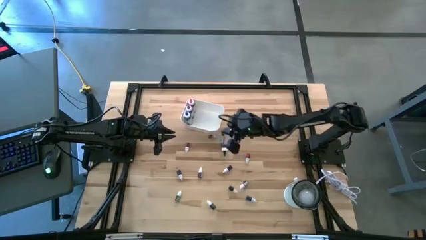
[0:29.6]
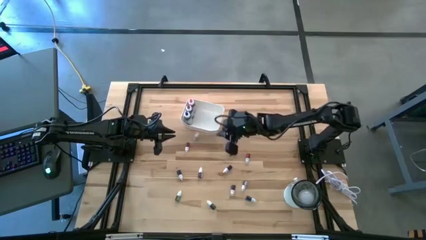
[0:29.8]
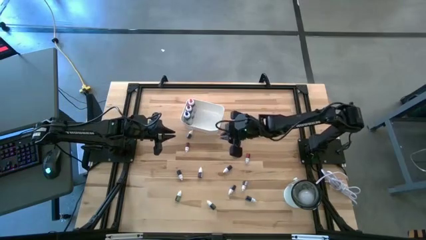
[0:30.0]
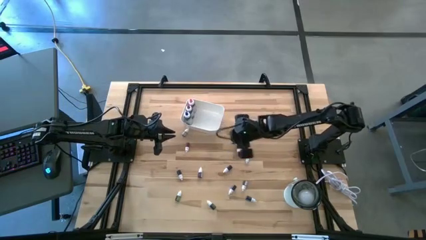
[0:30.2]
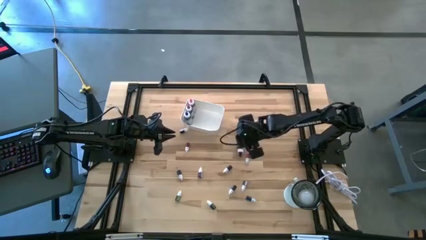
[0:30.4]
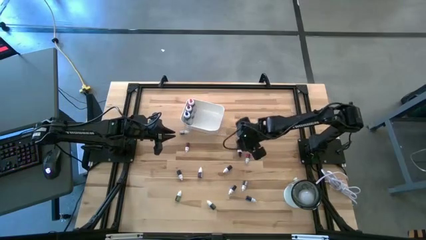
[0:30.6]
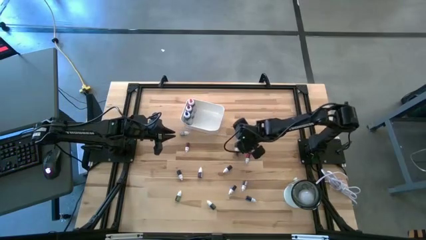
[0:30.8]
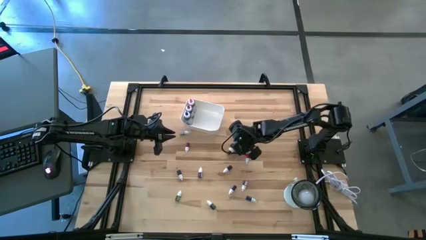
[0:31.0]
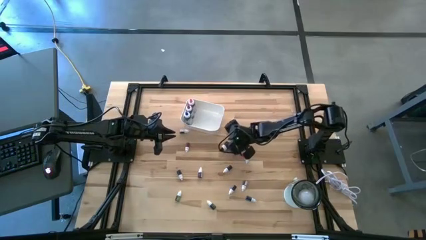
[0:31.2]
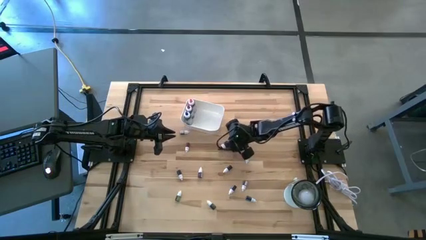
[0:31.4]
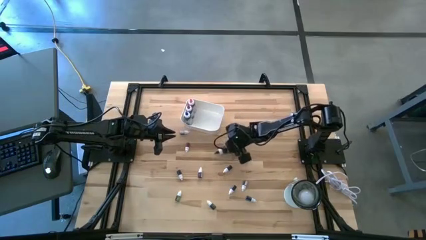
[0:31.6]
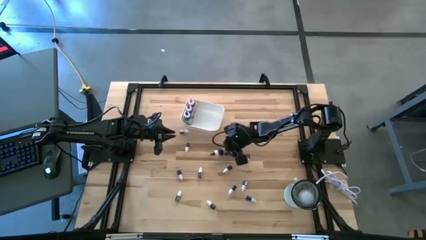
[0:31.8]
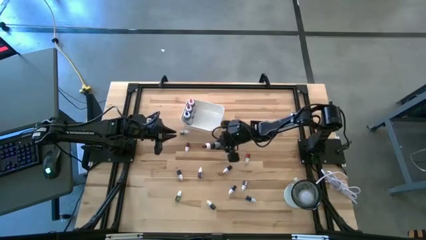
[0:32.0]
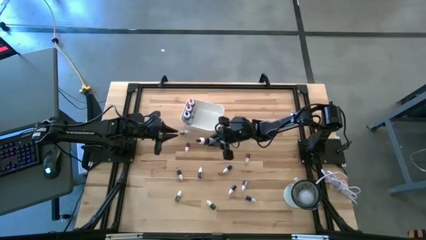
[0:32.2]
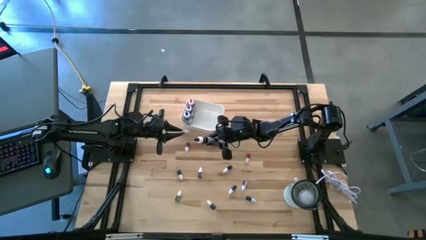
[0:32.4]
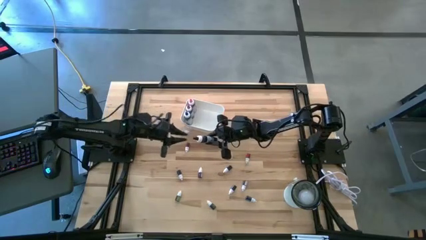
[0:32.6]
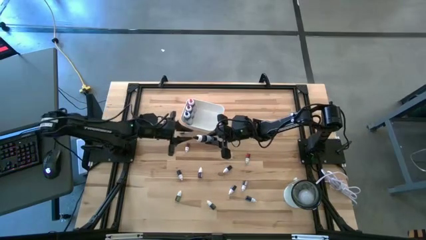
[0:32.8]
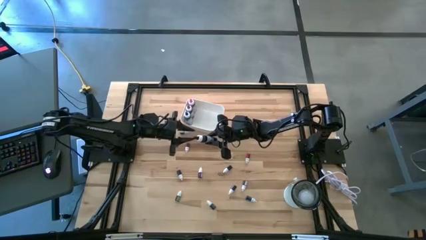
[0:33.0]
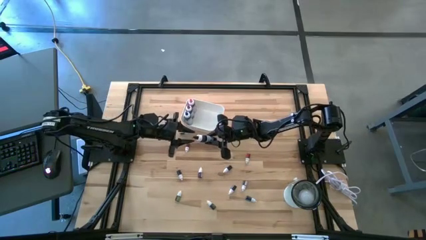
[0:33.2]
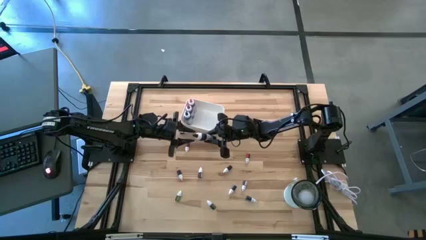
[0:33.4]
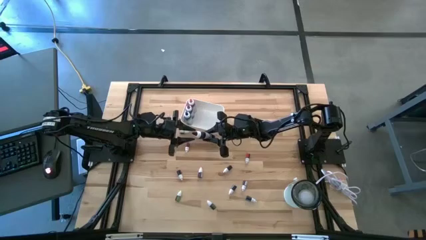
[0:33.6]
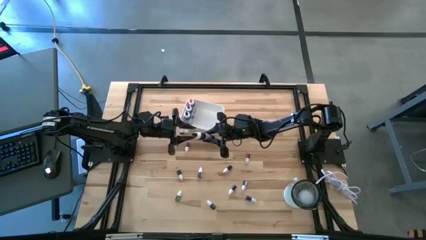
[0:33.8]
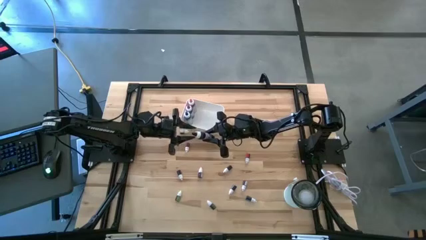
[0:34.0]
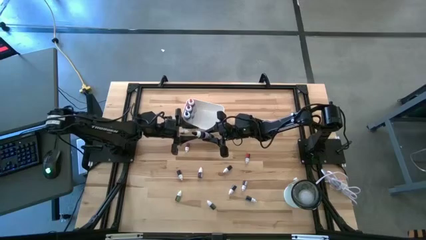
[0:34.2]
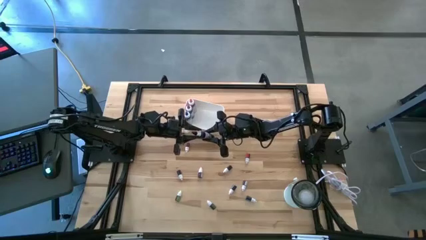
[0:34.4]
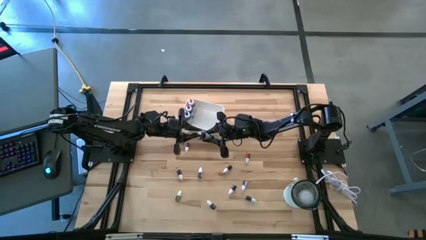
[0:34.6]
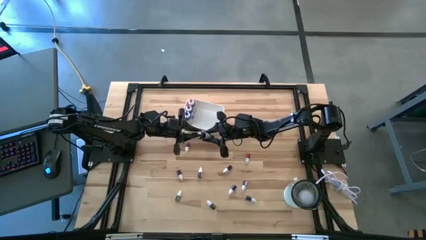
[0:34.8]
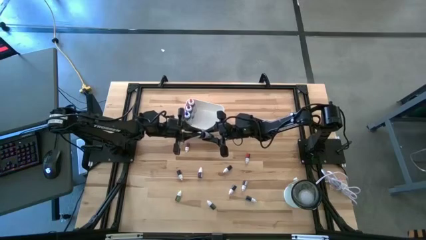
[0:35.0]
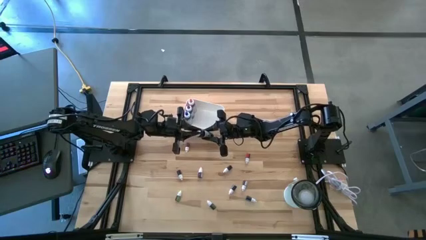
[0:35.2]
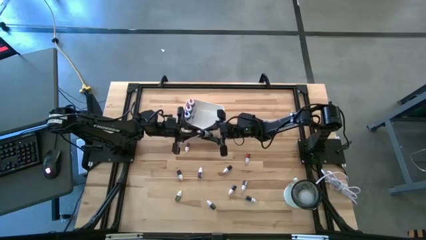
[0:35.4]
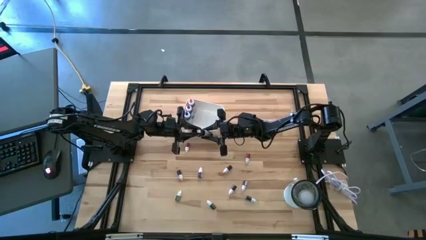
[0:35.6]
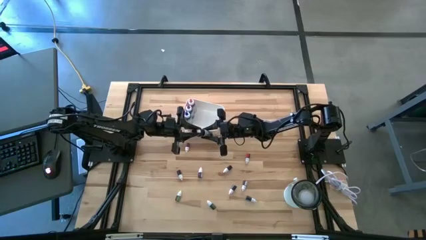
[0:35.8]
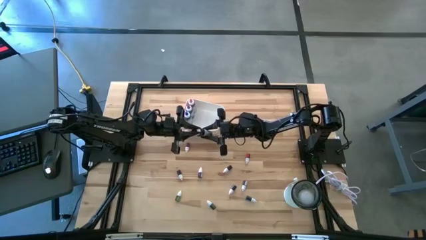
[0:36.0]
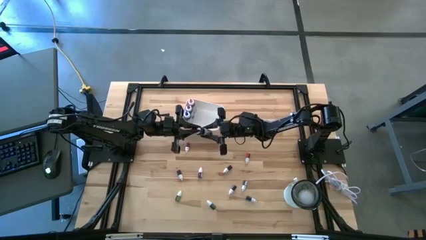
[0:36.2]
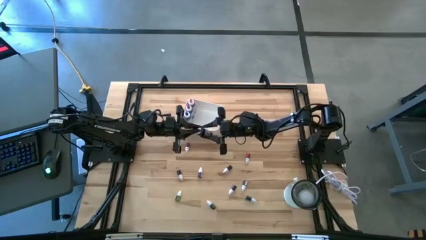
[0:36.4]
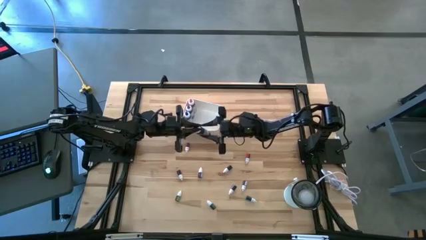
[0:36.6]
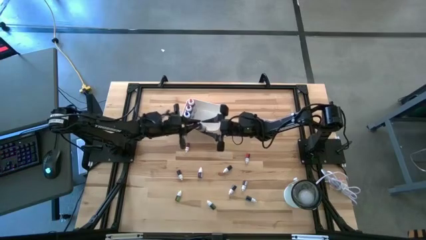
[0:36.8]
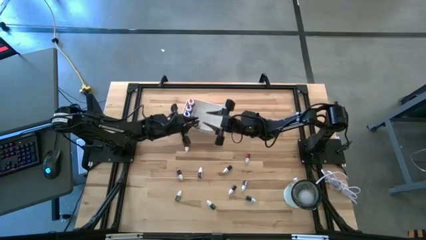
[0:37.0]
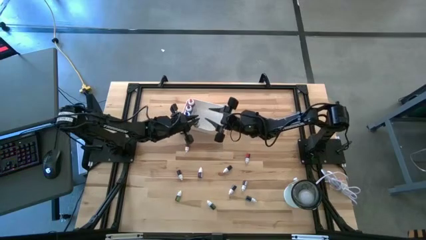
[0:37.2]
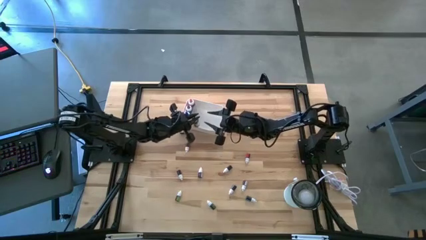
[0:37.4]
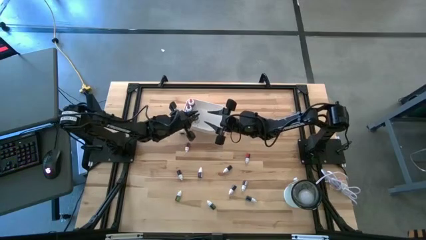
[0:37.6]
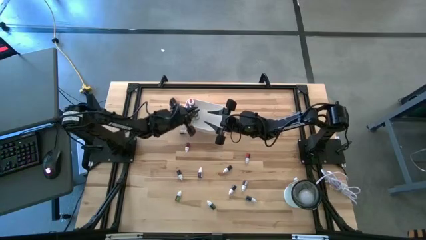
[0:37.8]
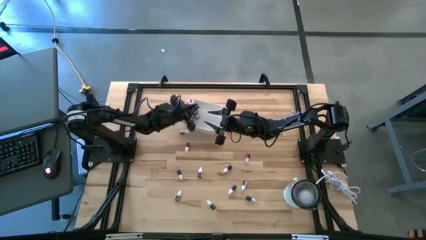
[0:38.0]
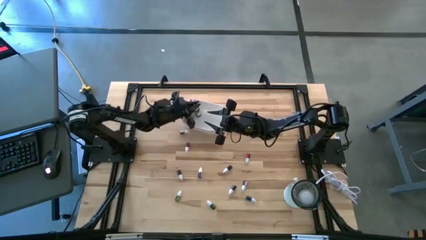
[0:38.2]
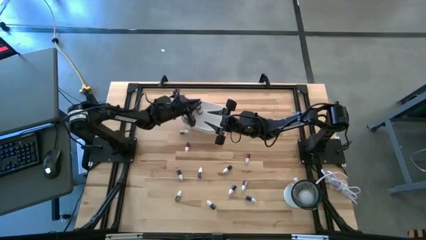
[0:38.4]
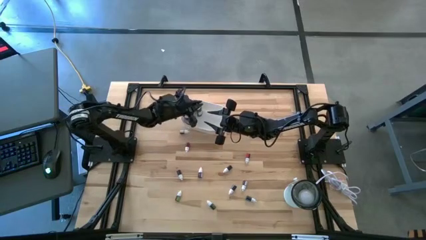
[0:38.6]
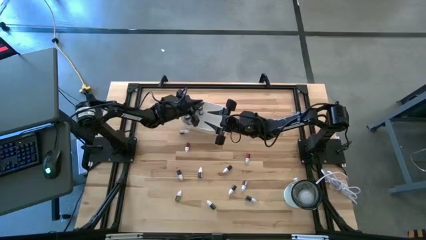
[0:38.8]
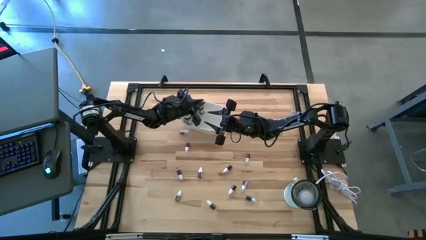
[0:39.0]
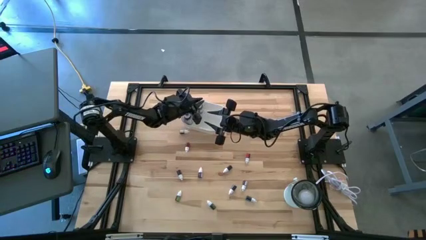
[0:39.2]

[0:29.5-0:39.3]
Task: Pick & Place food coloring
Put the large black food coloring bottle into the white bin

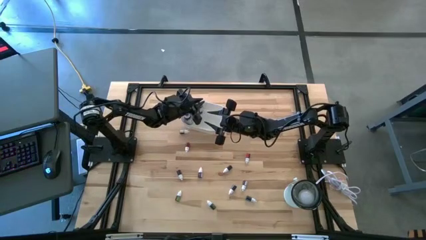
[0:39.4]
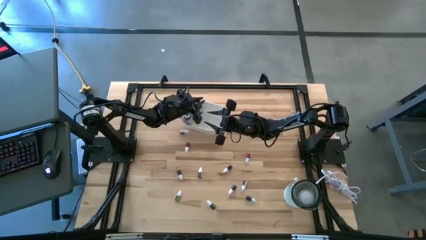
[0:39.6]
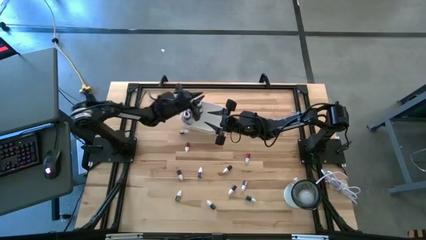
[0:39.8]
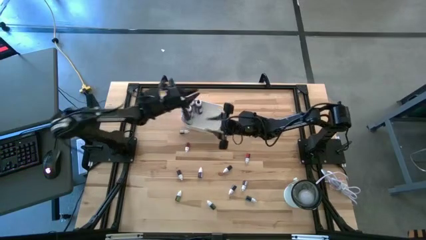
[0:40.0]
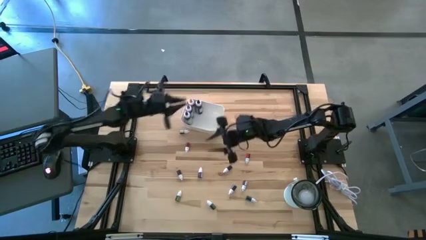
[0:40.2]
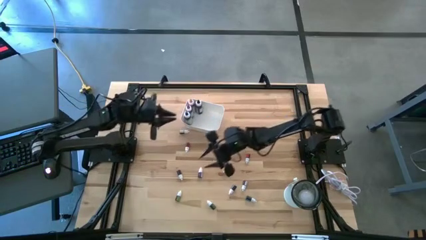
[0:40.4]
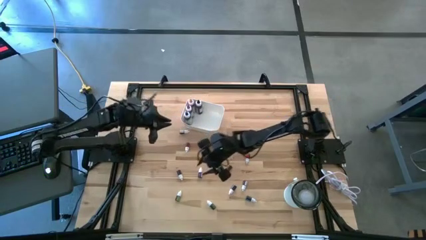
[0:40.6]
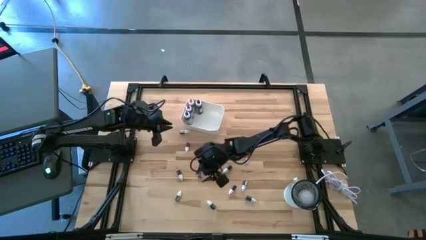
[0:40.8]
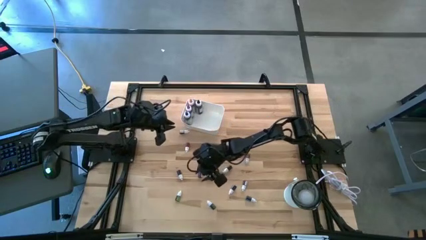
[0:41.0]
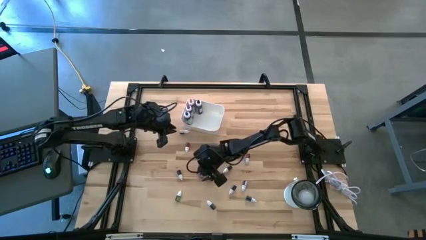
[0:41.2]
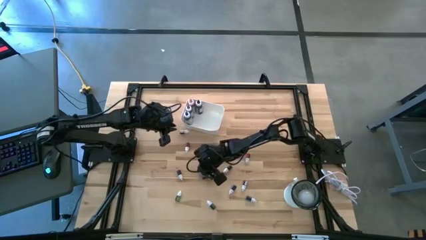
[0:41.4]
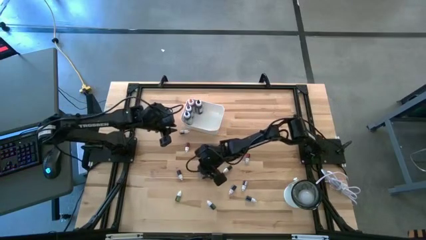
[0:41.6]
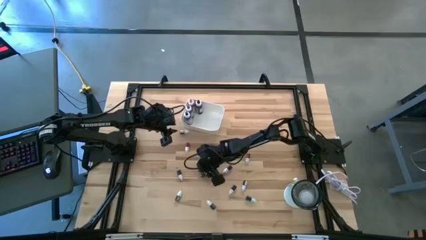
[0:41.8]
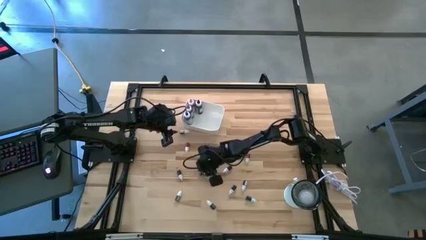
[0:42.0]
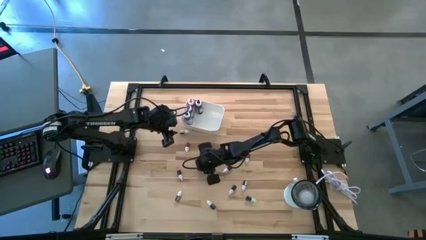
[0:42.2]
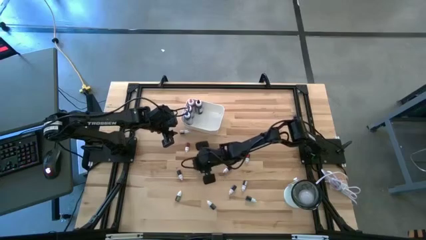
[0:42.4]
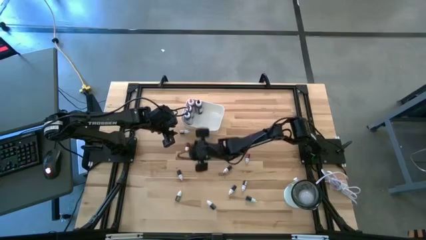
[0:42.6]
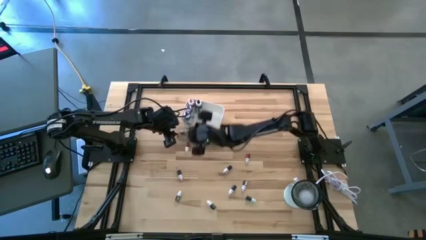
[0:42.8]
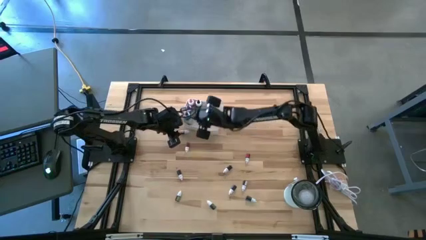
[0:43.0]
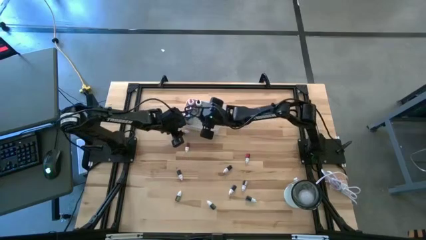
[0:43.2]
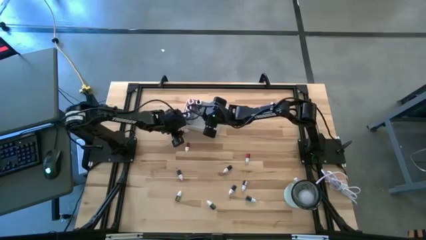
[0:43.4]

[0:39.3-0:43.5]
Put the small left purple food coloring bottle into the white bin

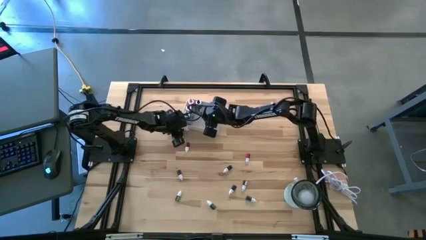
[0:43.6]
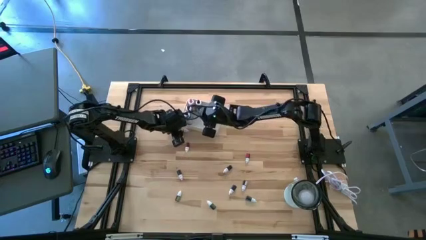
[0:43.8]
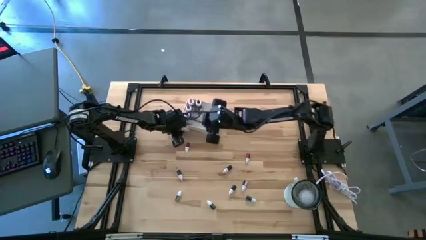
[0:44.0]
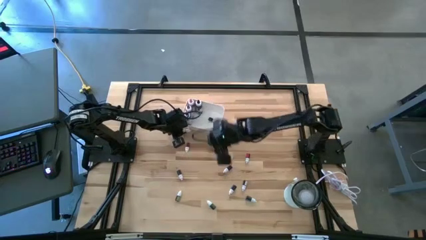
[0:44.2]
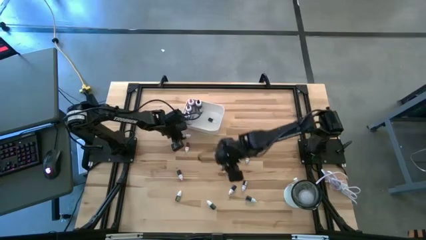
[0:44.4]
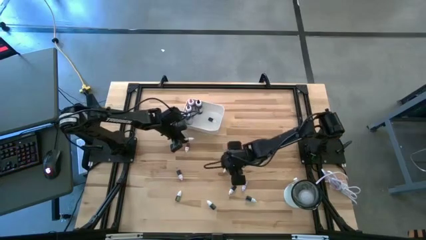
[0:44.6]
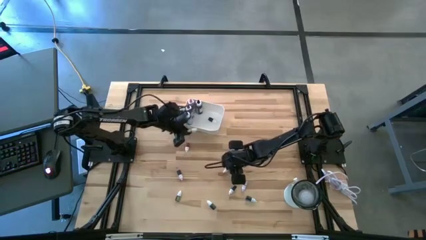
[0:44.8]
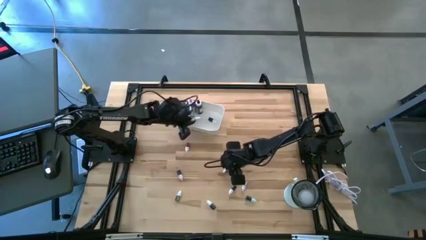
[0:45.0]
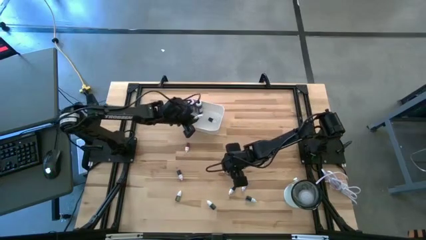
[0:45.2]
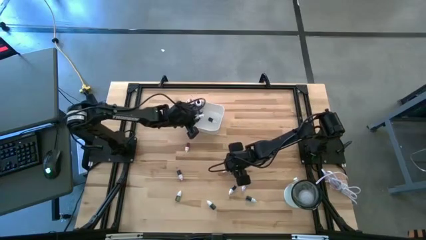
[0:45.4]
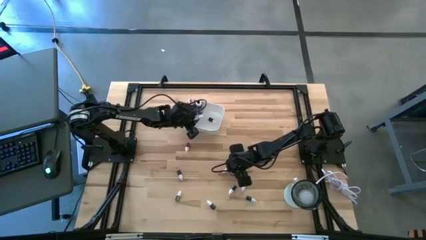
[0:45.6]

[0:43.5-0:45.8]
Put the small top green food coloring bottle into the white bin

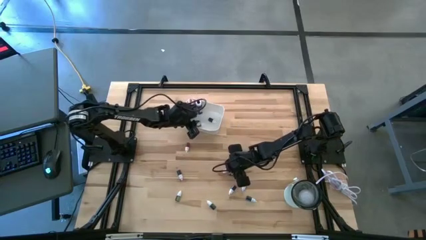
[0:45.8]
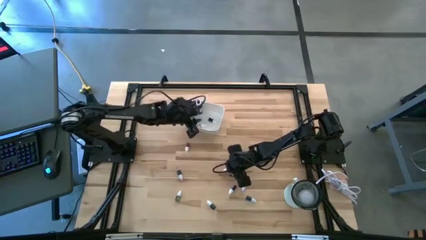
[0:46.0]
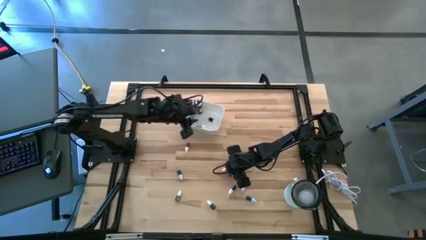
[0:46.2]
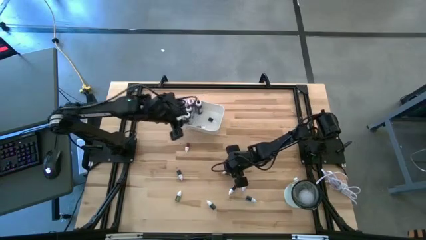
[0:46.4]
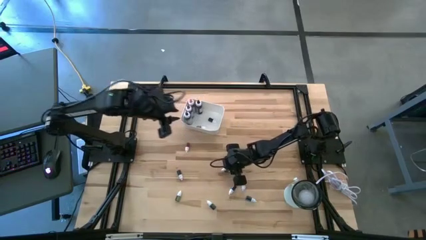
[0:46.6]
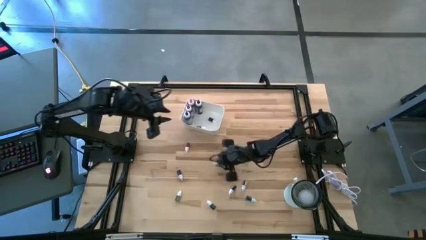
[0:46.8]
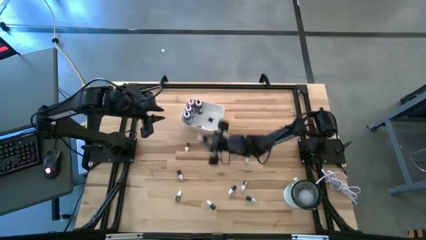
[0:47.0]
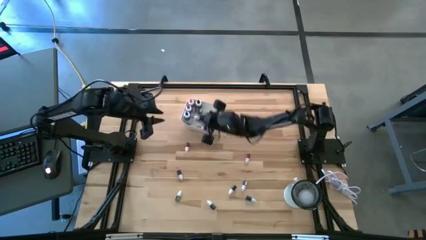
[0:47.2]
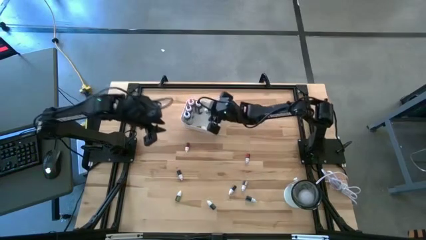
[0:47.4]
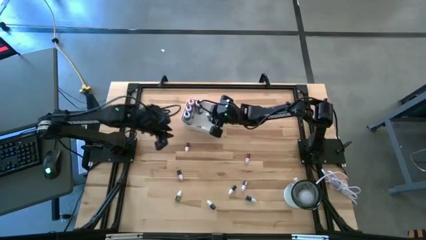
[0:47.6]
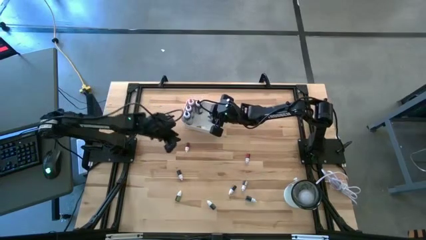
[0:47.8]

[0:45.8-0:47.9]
Put the small purple food coloring bottle into the white bin

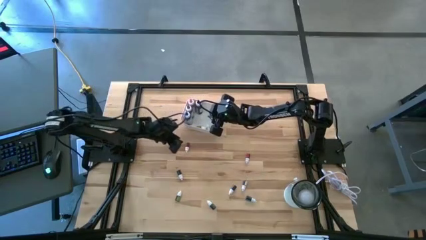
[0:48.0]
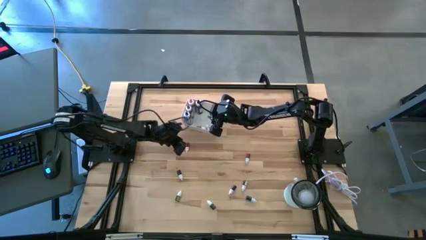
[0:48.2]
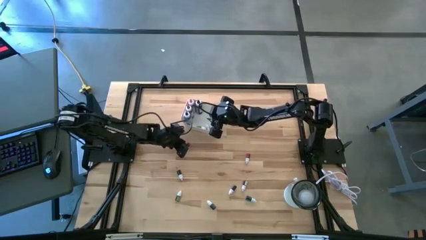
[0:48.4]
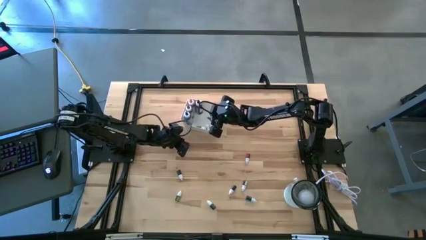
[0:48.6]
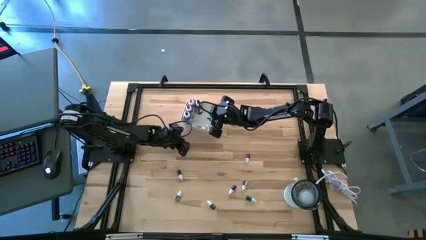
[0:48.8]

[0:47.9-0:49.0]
Put the small top left red food coloring bottle into the white bin
